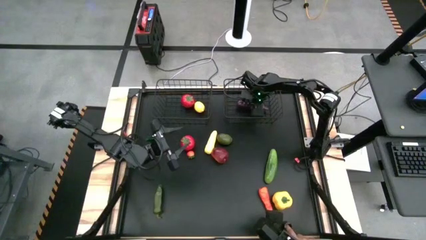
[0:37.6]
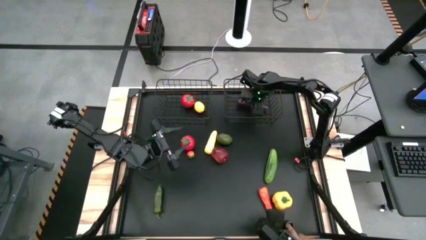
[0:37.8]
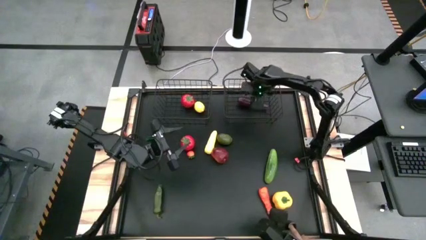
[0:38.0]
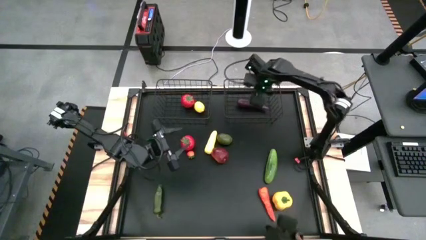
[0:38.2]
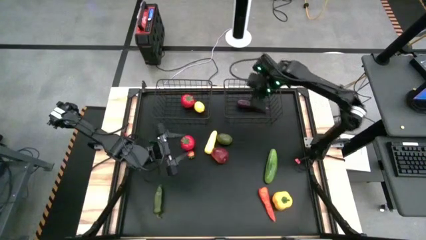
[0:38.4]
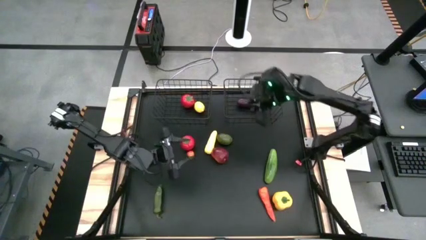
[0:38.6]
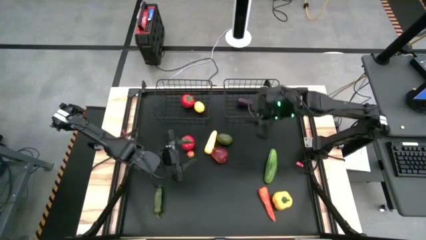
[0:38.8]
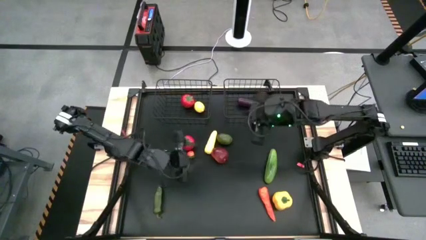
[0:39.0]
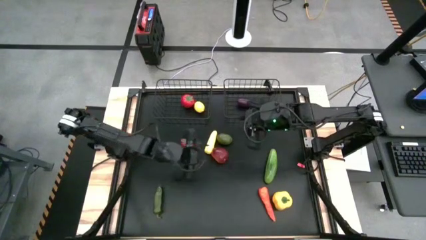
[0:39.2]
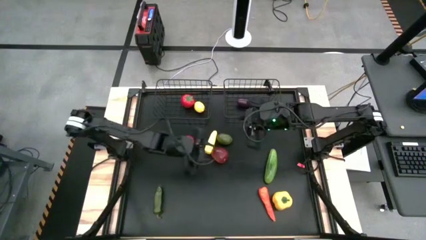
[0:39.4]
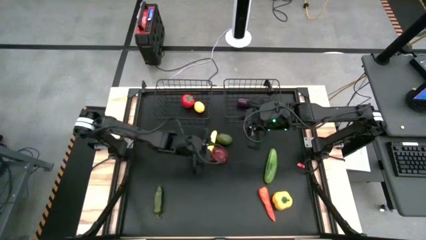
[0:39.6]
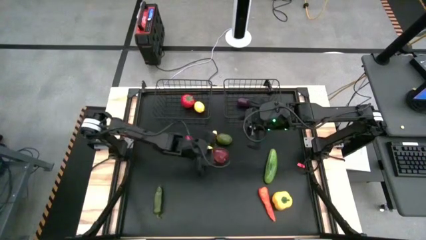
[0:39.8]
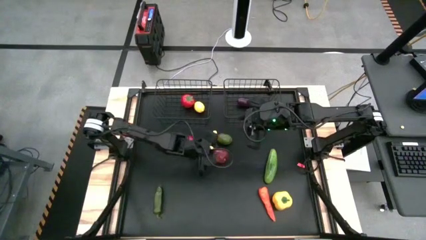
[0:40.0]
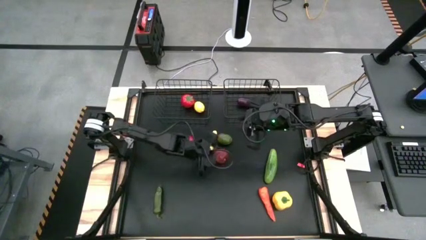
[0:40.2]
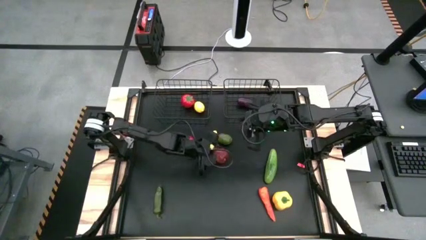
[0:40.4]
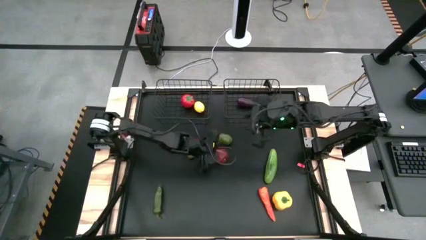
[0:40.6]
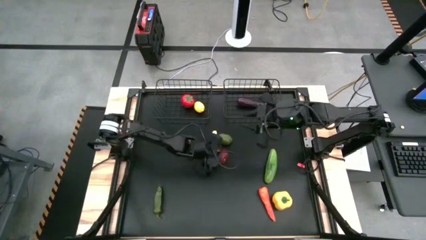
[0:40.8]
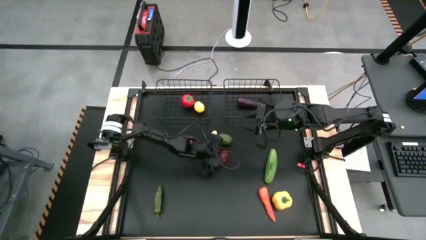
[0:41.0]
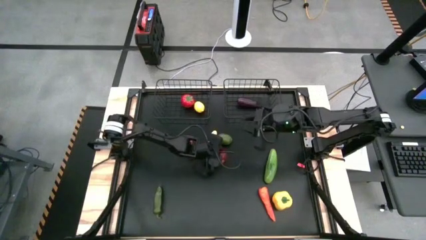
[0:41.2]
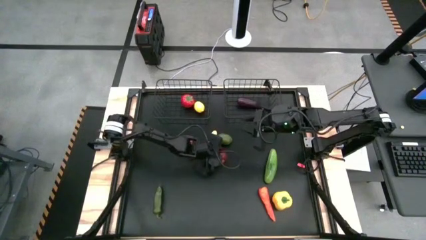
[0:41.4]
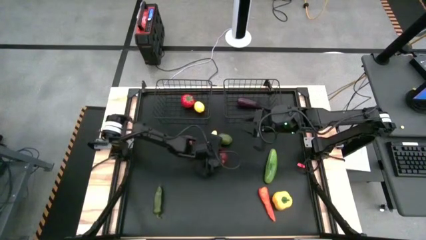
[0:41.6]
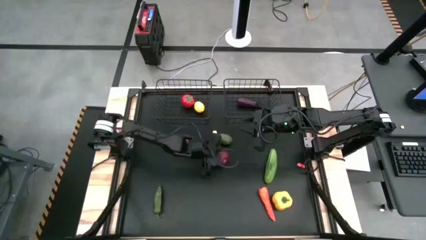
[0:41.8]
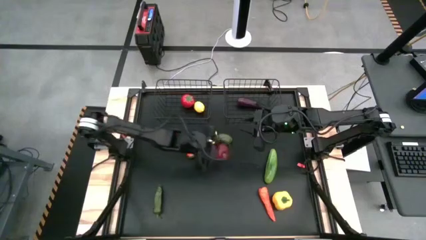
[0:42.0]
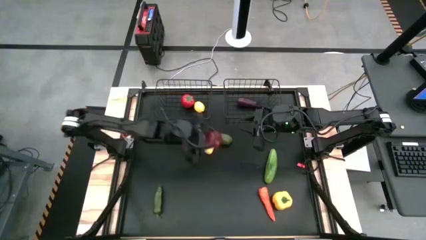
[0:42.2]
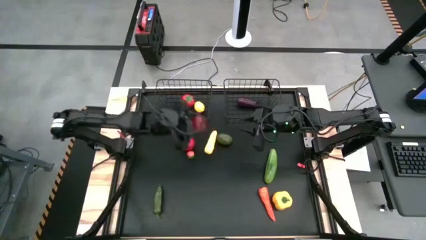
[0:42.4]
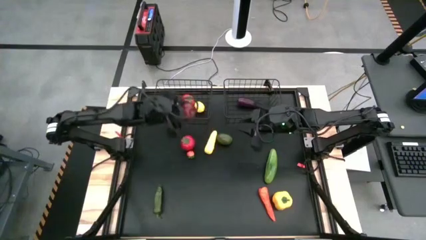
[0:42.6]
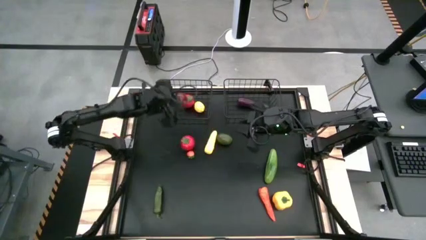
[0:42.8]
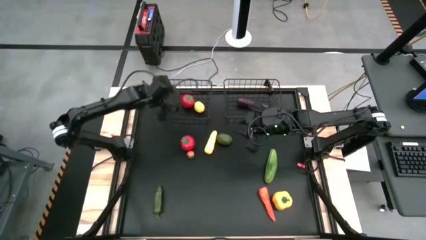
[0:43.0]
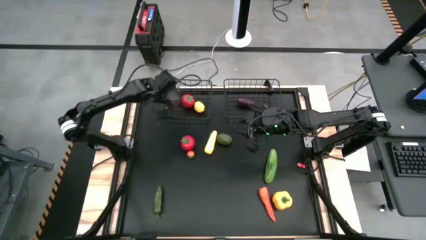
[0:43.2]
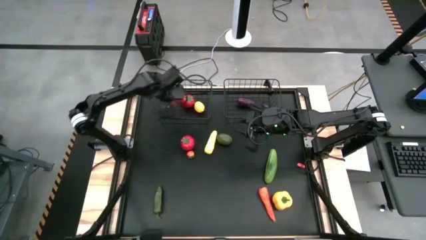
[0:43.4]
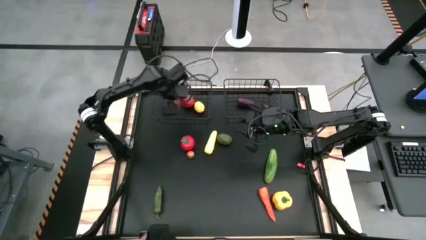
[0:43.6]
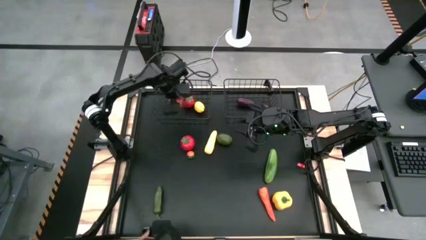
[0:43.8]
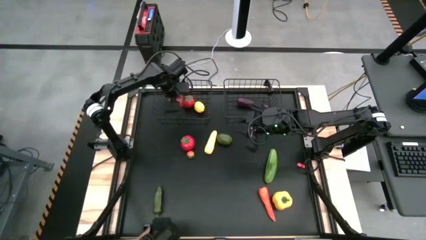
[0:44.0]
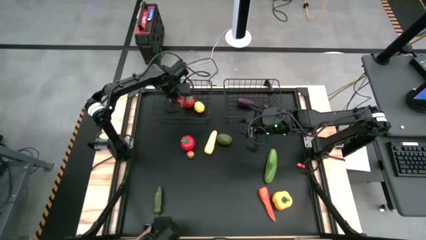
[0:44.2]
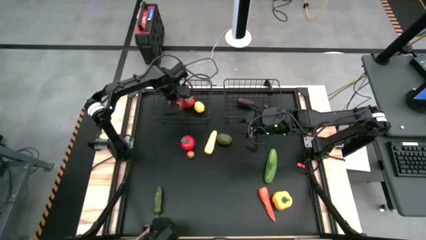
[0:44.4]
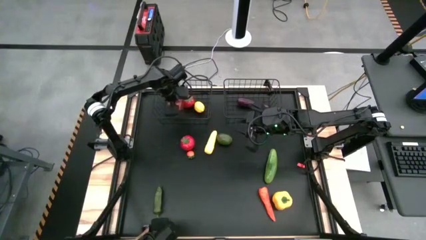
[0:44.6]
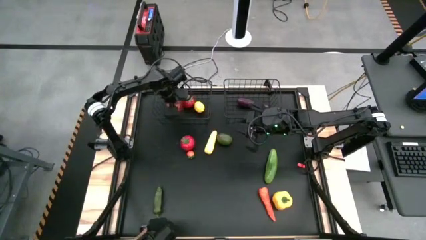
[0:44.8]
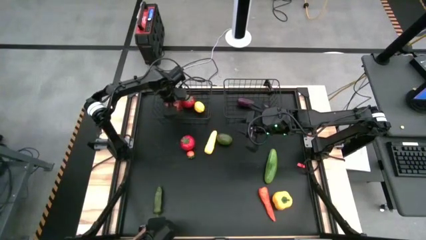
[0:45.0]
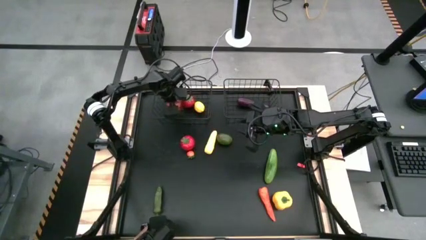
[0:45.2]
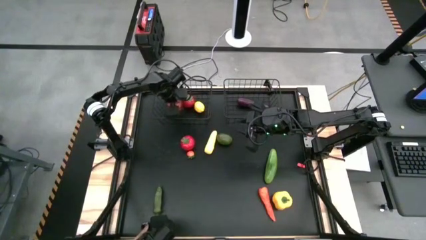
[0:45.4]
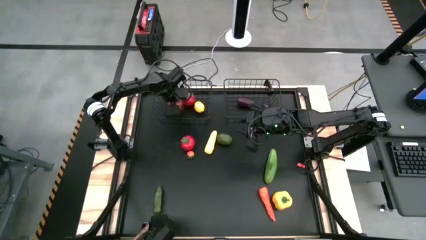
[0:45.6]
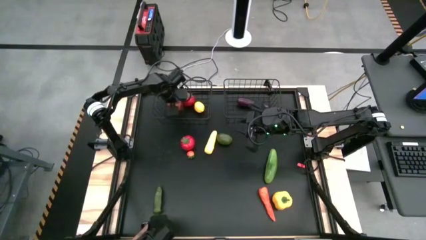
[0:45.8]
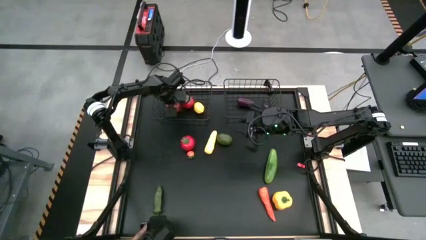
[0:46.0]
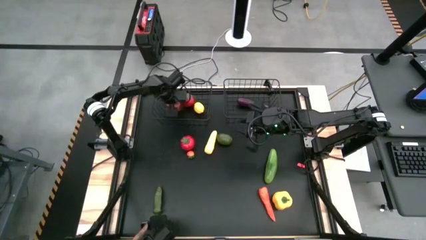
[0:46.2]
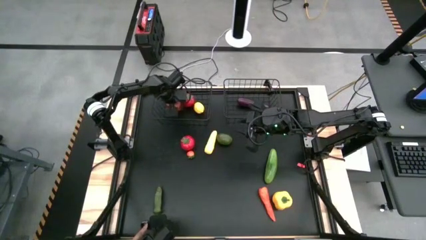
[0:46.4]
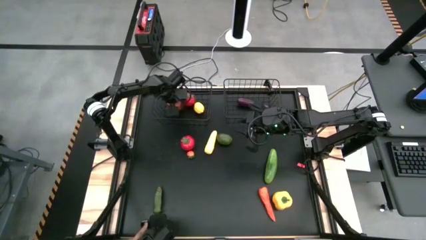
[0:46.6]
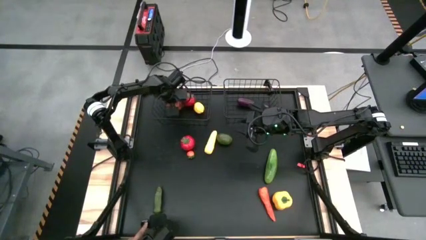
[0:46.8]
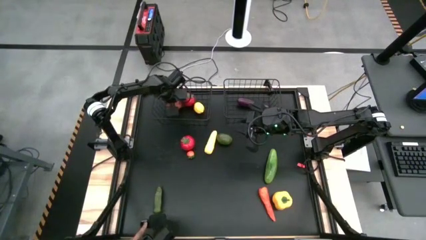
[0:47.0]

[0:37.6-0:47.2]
Task: Sort produce into baskets
Put the apple into the left wire basket

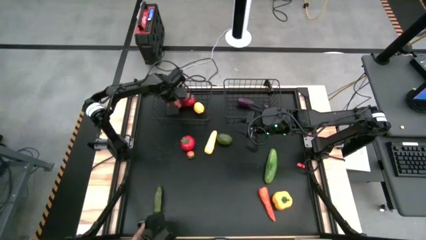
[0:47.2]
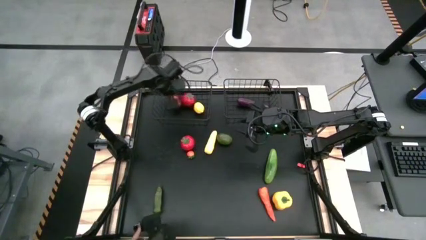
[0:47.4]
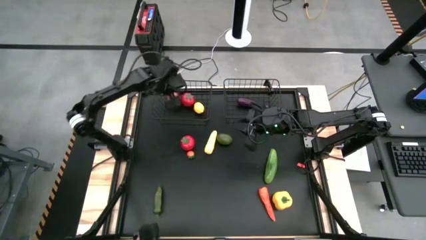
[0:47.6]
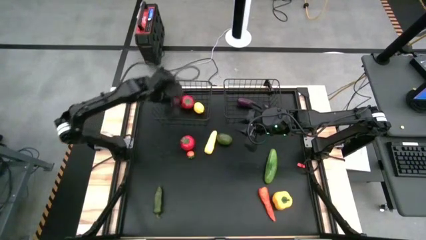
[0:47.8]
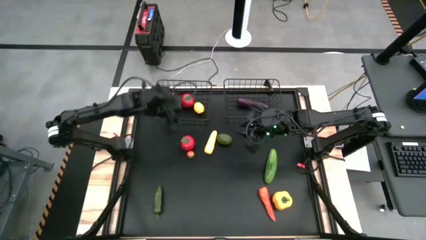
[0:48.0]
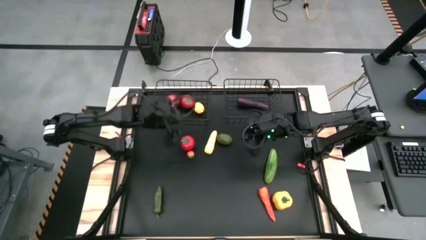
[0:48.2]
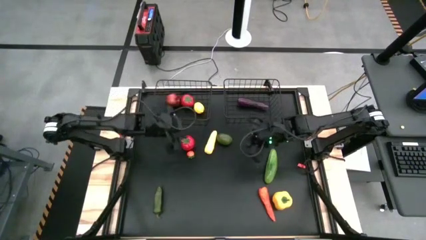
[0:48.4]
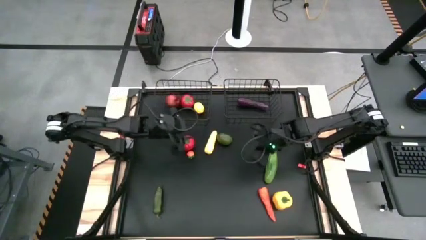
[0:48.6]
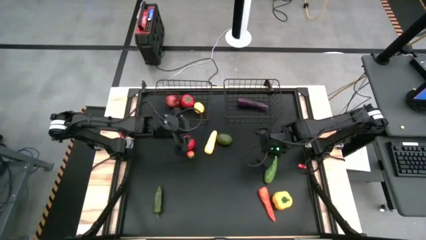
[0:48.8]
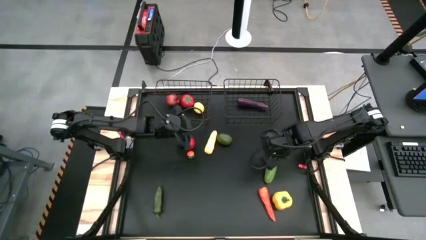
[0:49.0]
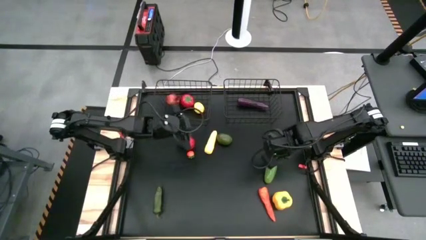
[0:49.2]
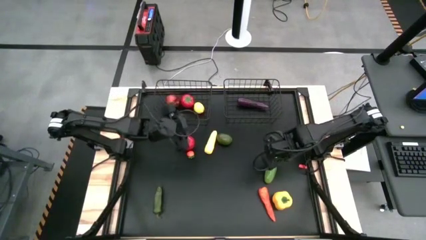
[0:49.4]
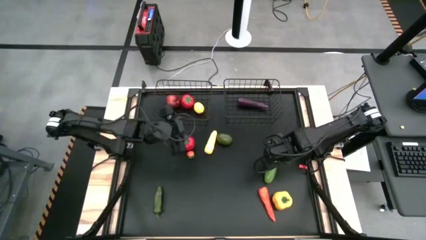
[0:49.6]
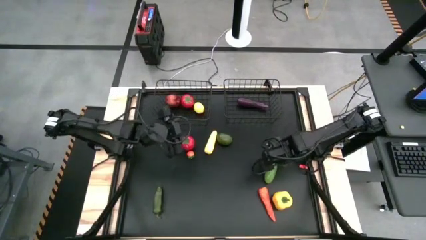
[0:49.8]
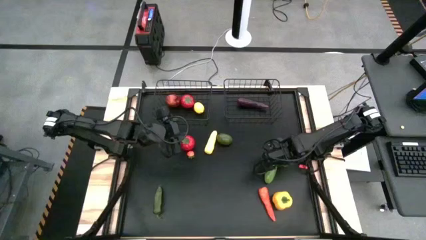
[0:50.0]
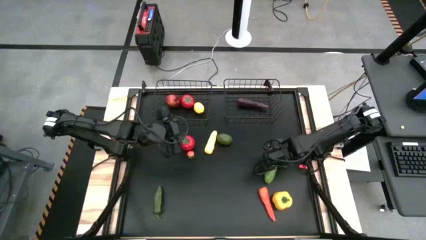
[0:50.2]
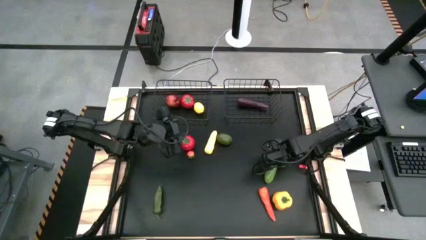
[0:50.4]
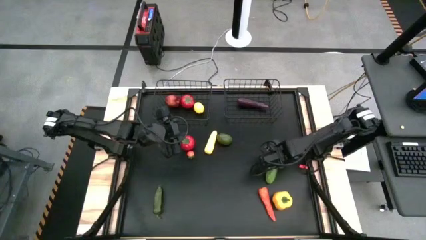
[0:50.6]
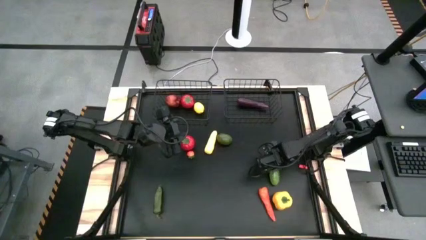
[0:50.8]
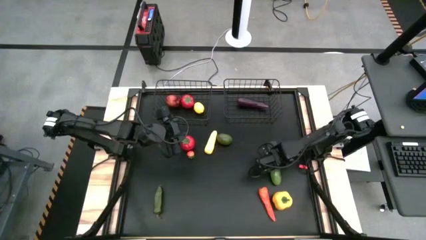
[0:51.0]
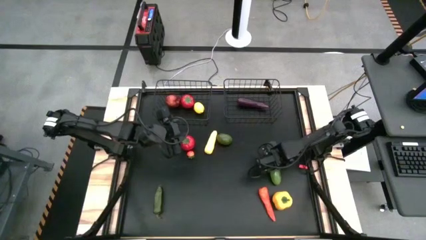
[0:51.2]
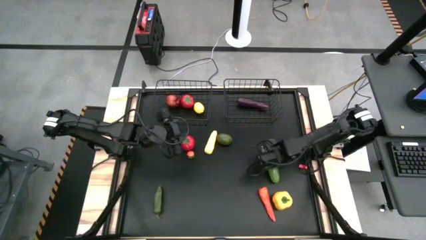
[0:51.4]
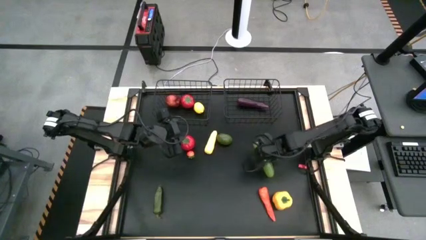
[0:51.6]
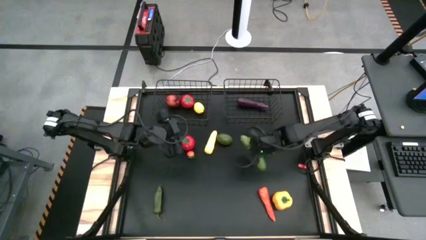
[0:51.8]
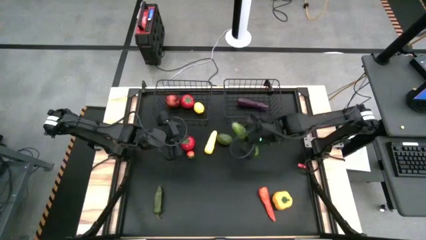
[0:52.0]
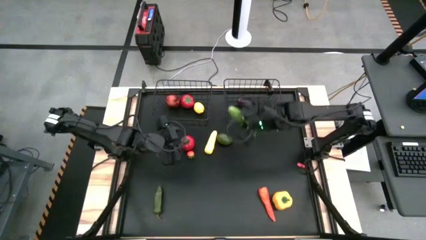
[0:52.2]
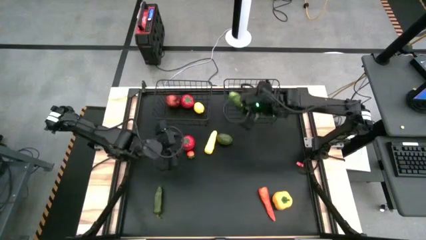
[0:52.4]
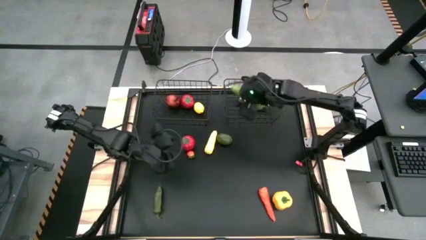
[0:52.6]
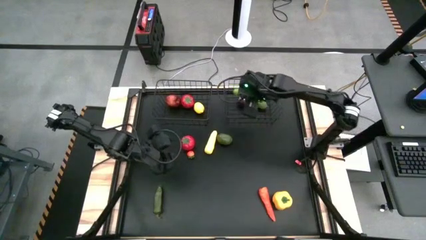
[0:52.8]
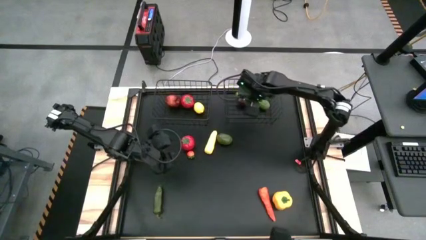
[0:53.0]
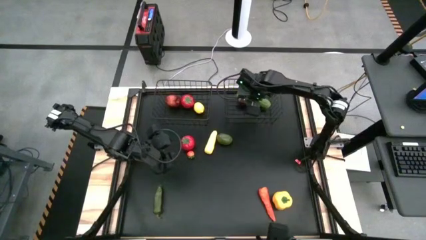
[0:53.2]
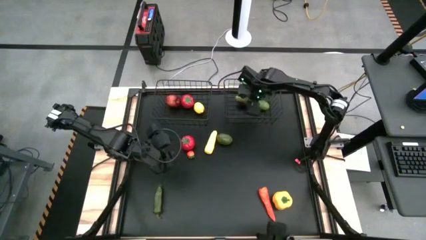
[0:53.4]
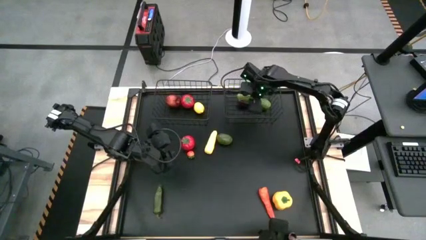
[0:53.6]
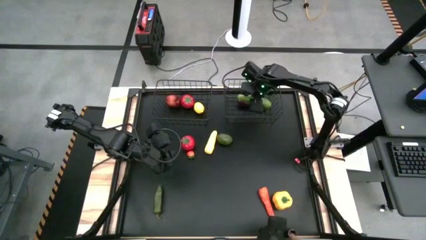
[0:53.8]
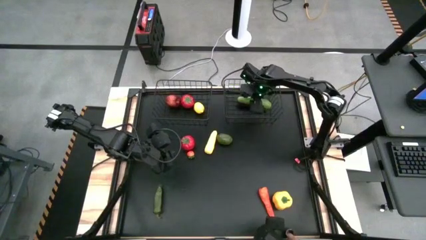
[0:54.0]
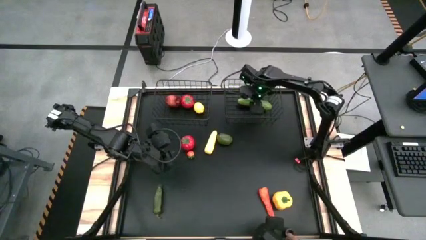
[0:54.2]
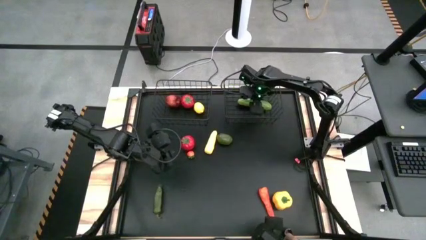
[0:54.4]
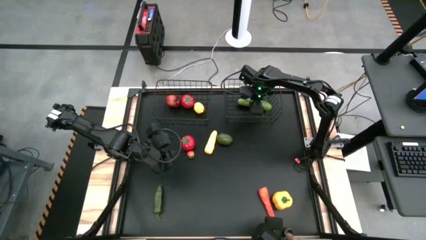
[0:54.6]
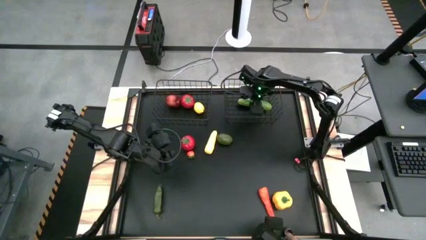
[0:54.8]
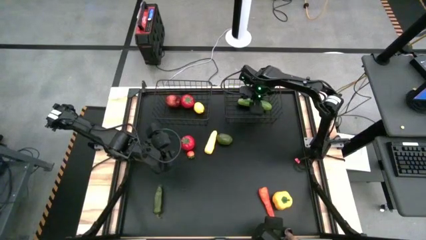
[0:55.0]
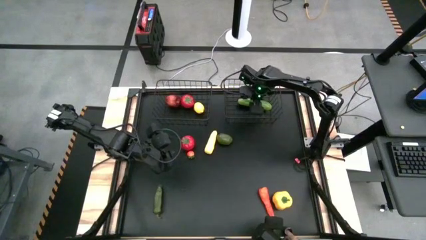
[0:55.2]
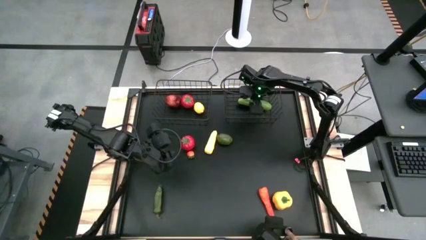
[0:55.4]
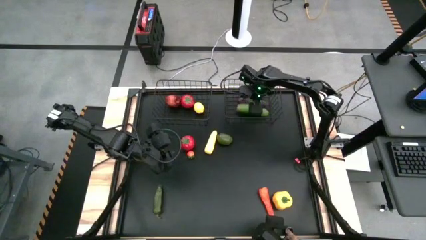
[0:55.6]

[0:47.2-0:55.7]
Put the cucumber into the right wire basket
